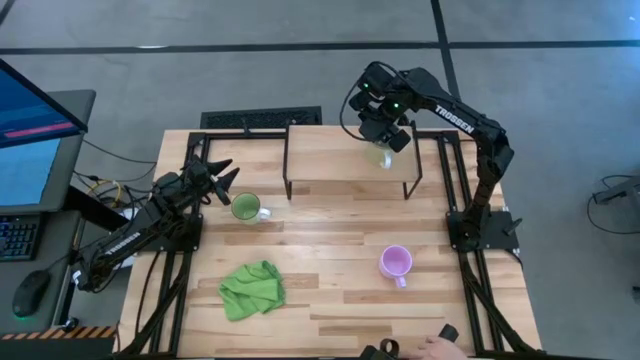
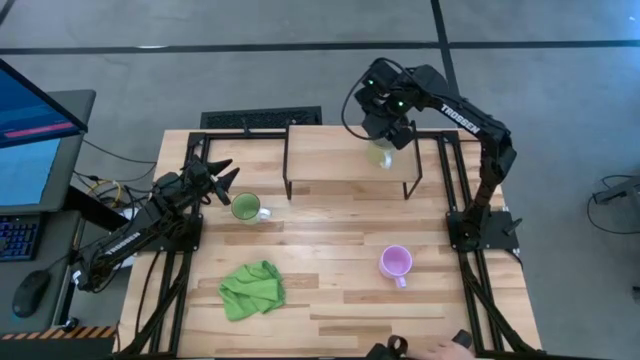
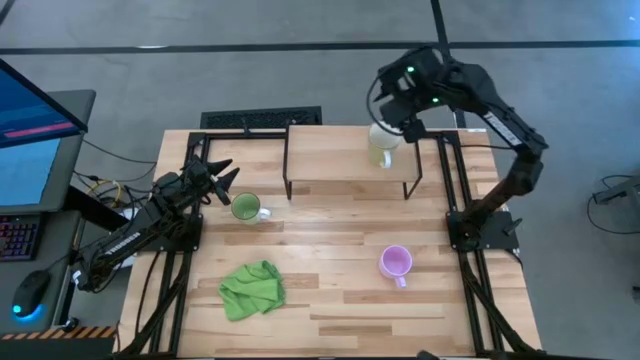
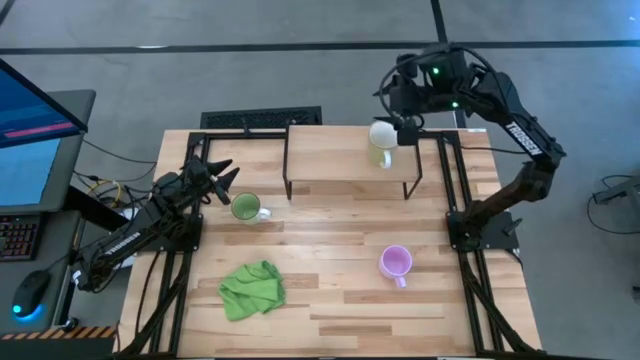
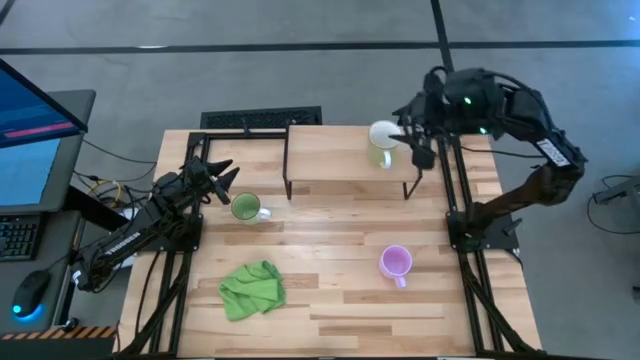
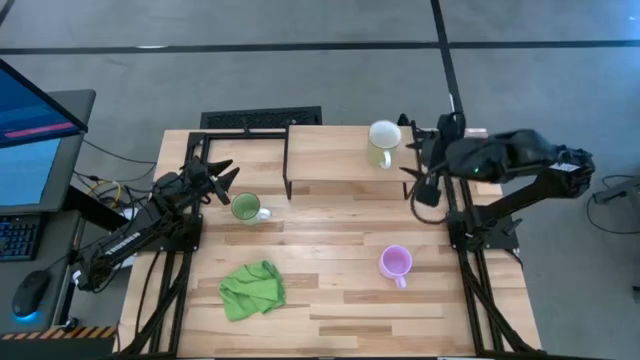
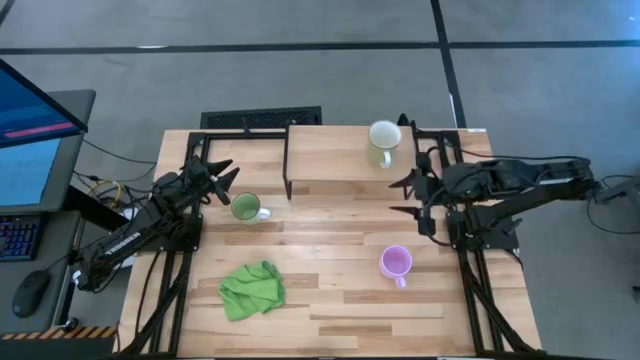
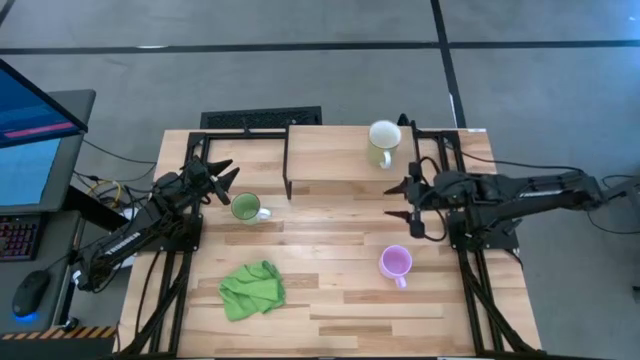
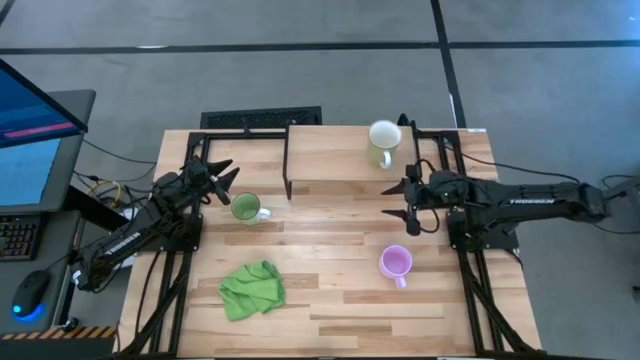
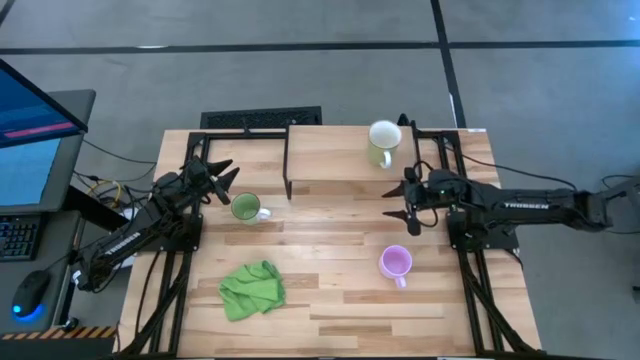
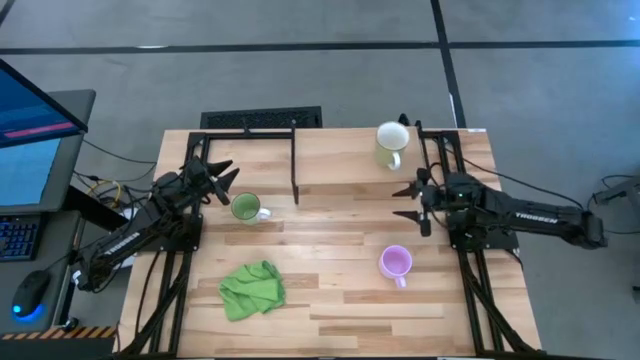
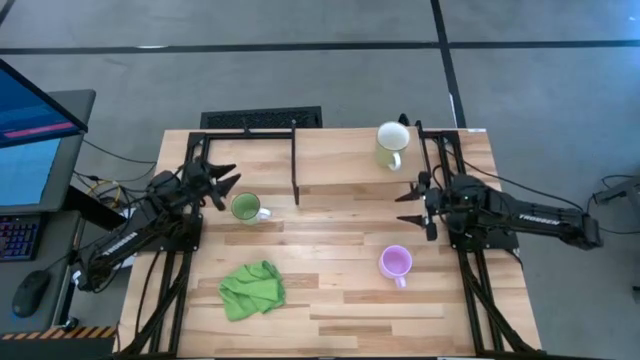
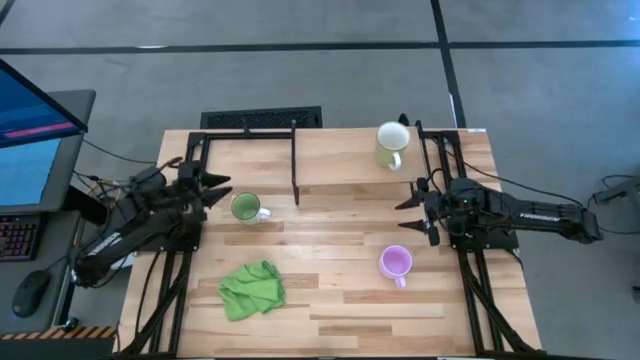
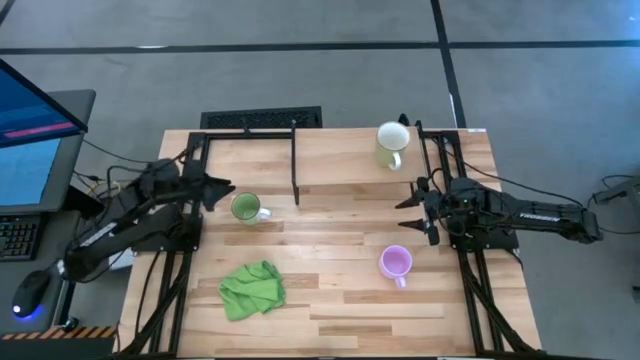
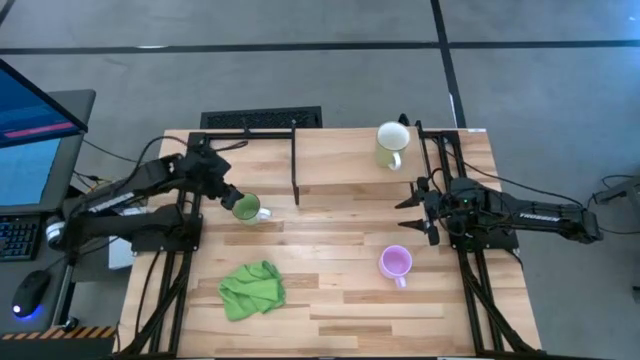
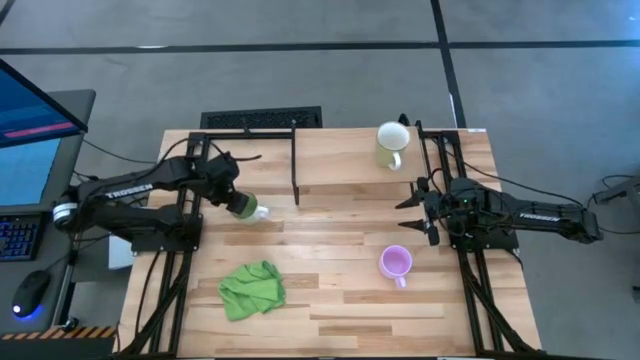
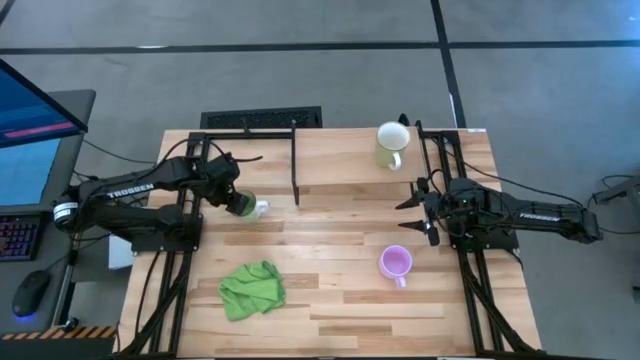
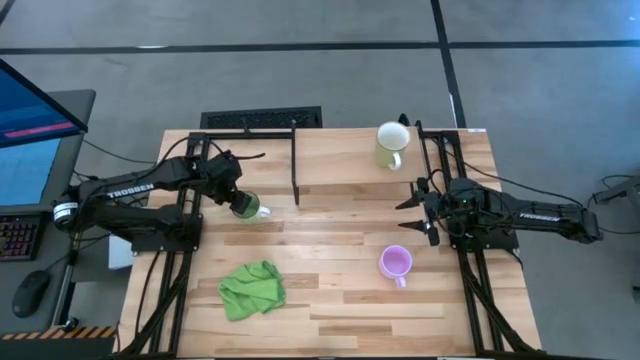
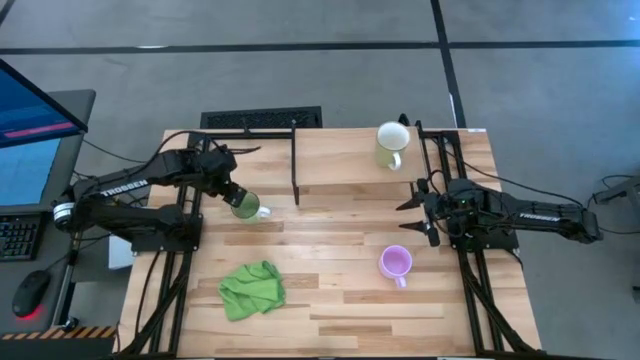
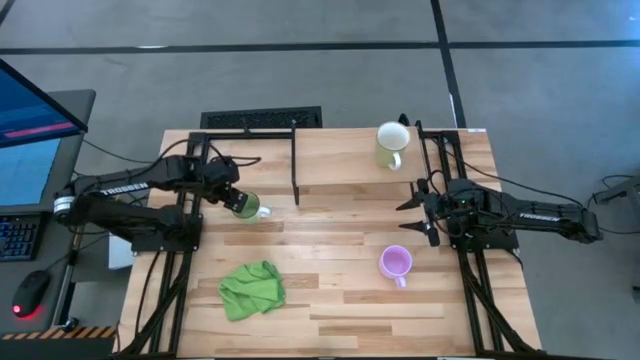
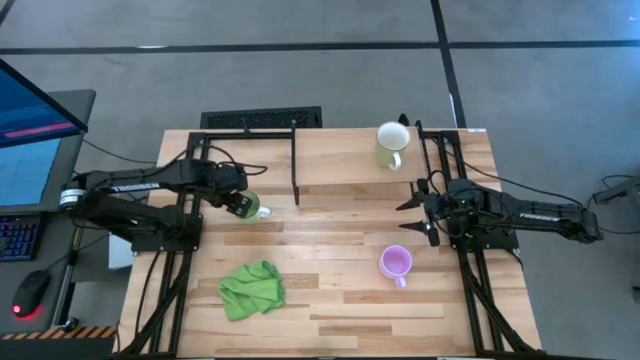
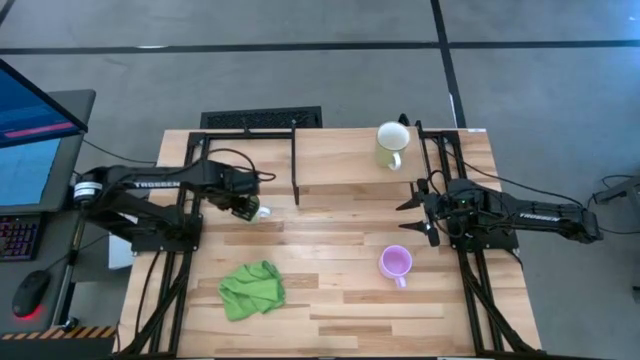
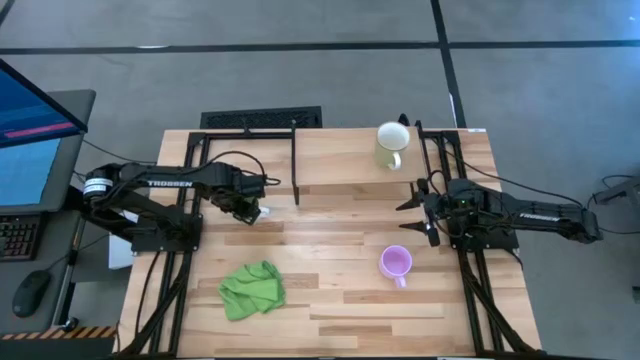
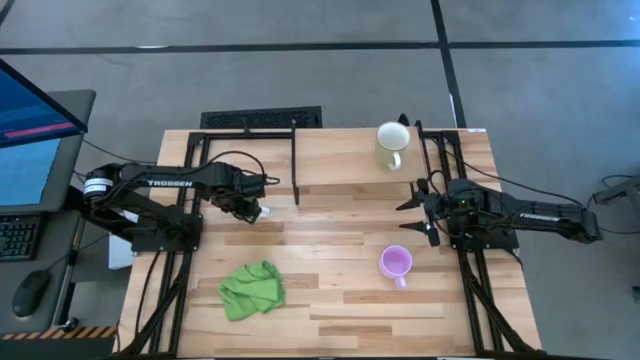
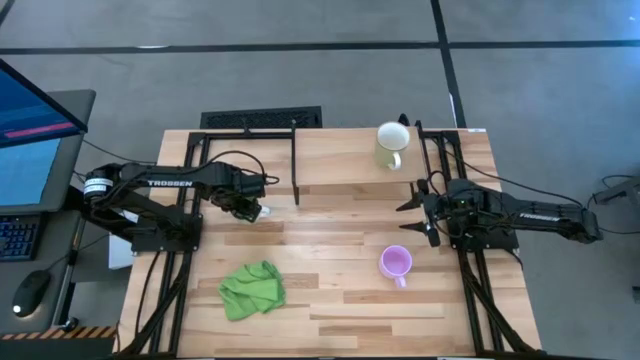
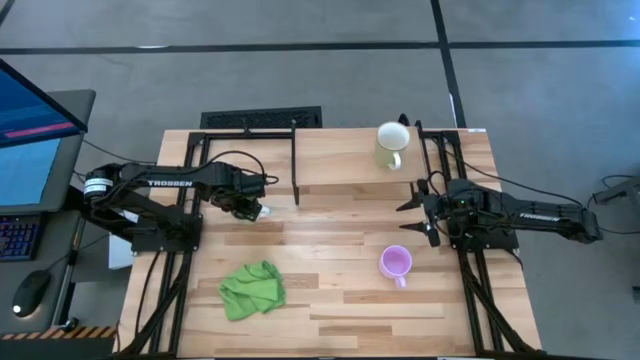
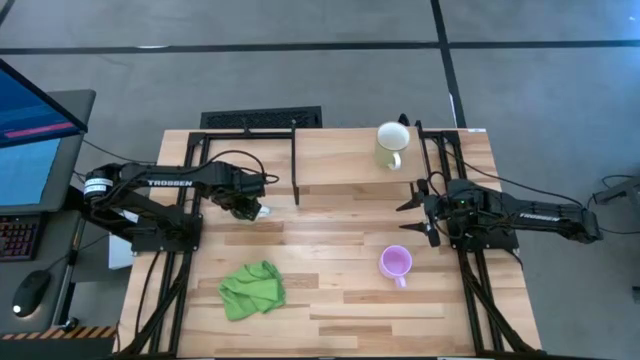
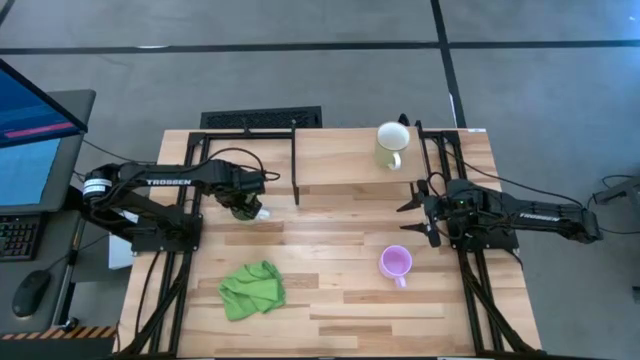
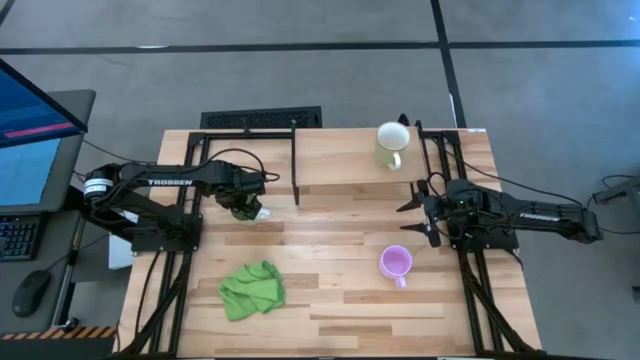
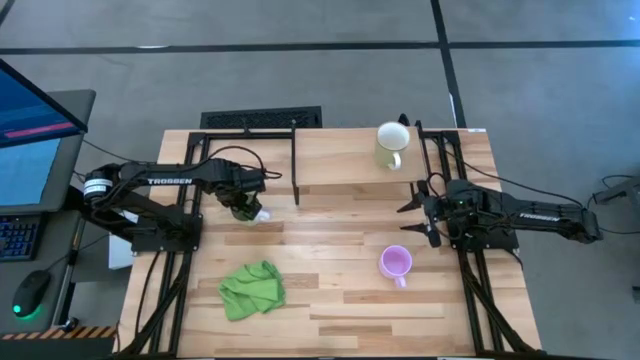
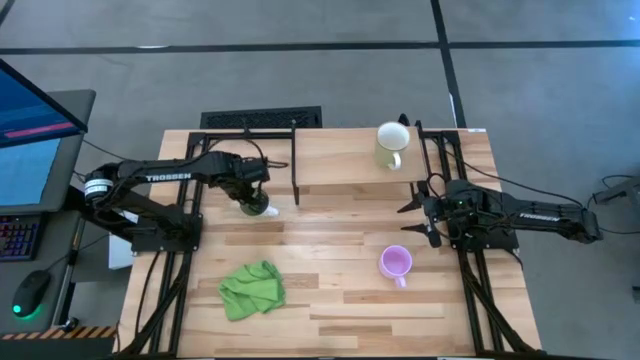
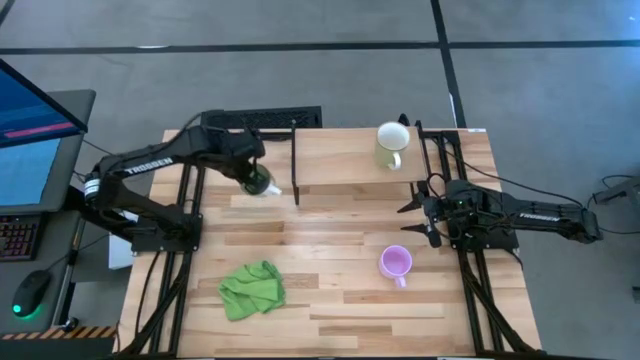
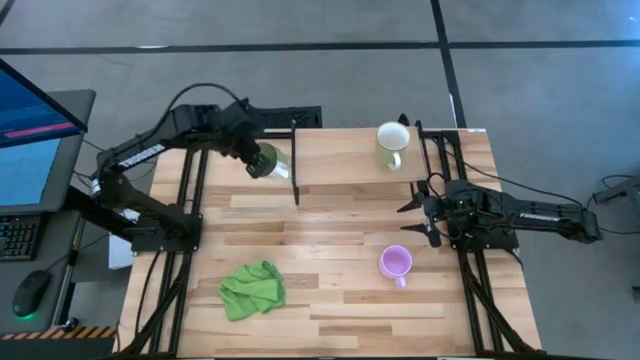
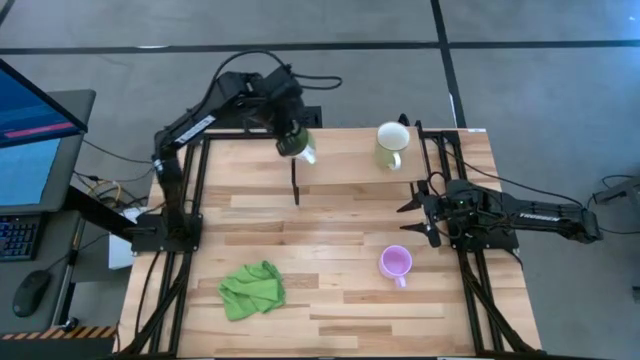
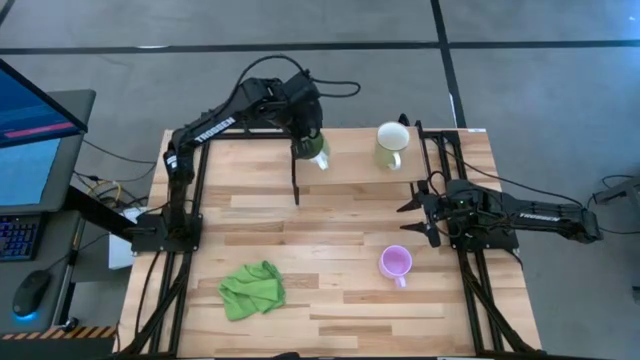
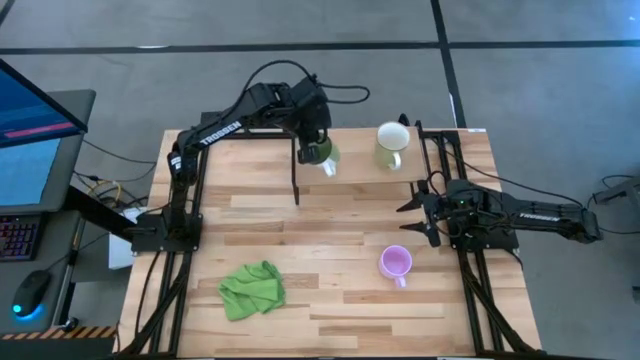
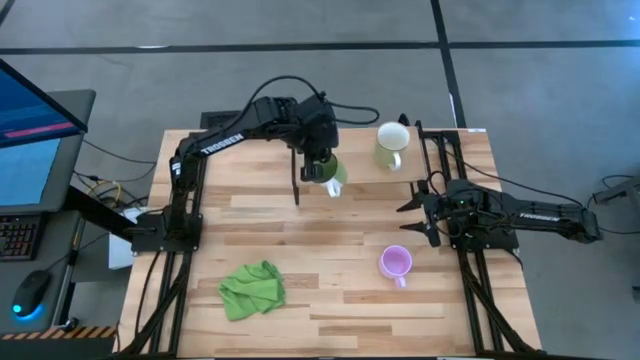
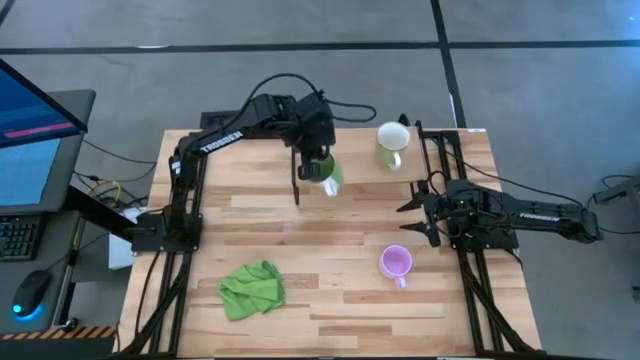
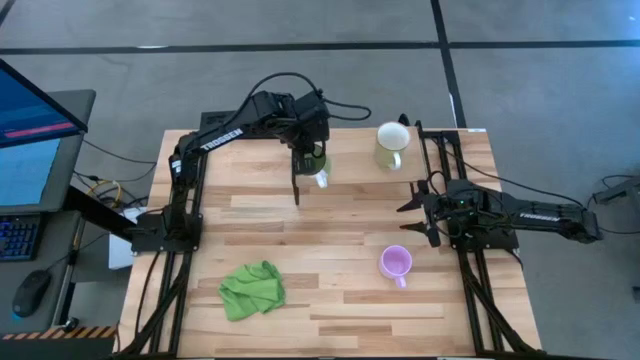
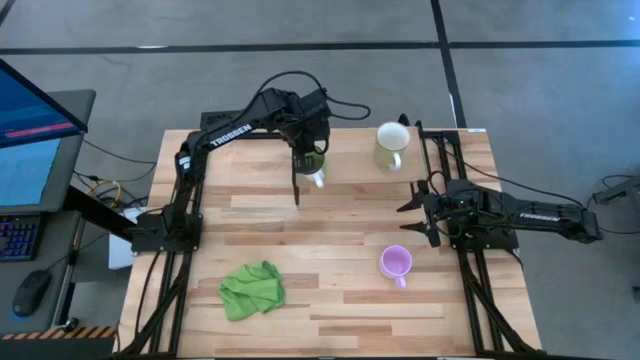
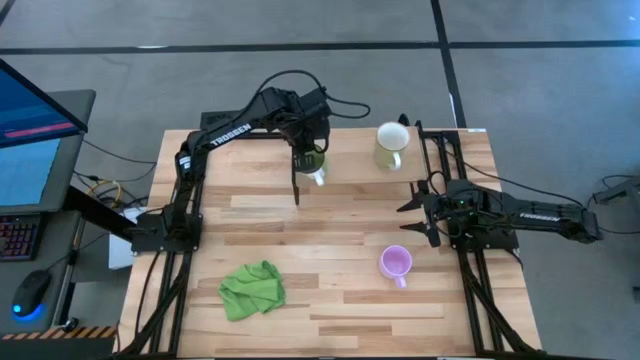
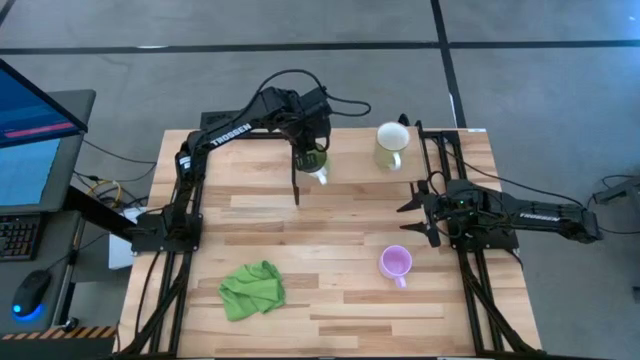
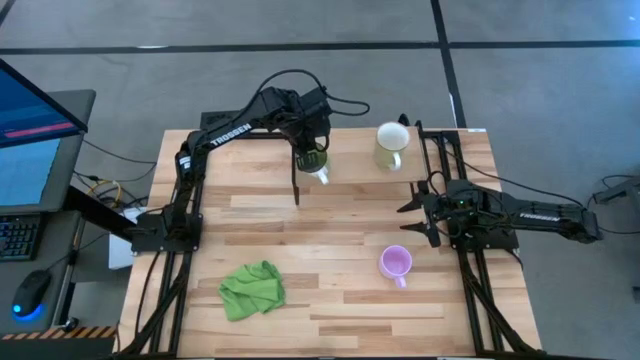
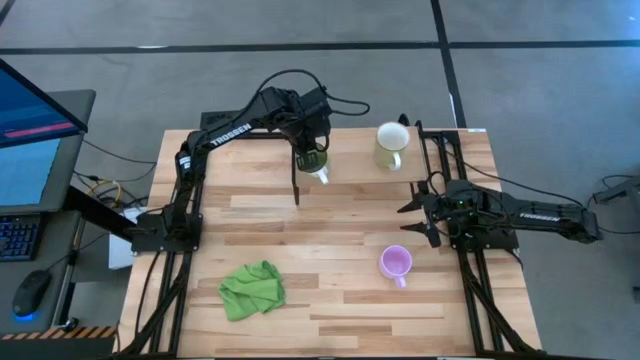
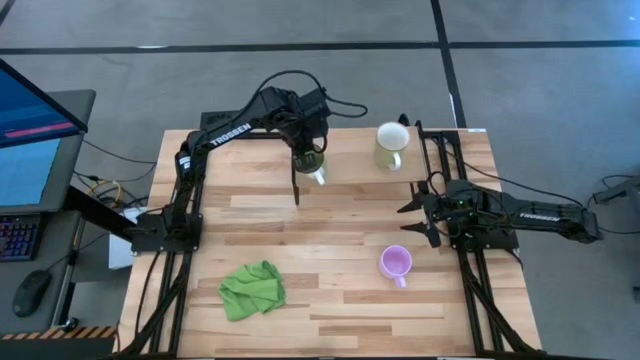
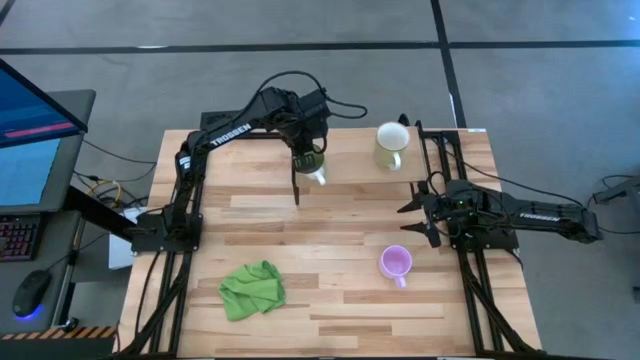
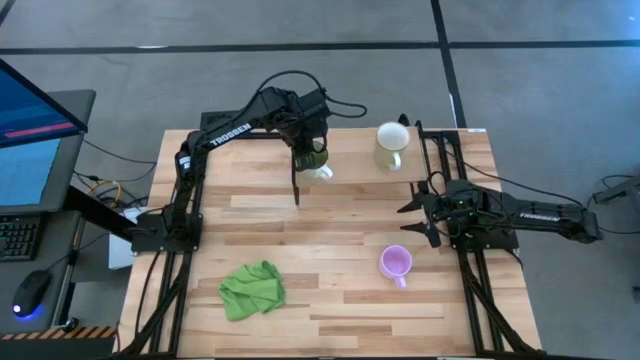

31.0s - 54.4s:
Task: Stack small to large cups/mugs on shelf
Put the green mug on the shelf
